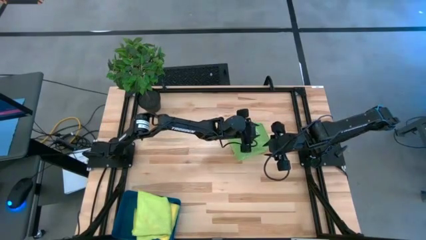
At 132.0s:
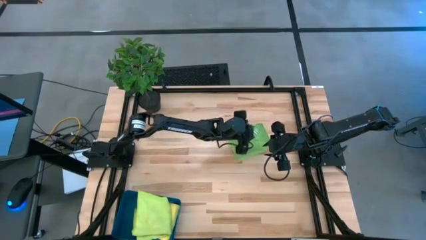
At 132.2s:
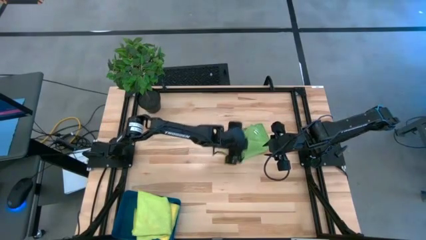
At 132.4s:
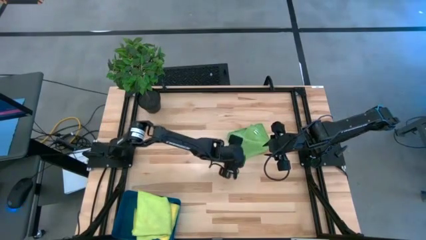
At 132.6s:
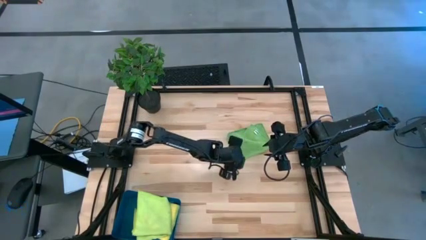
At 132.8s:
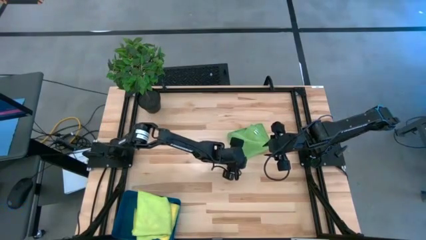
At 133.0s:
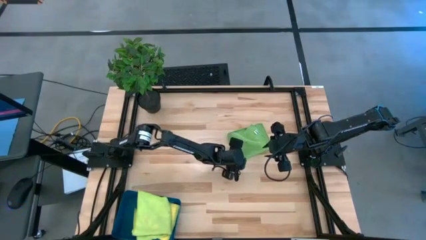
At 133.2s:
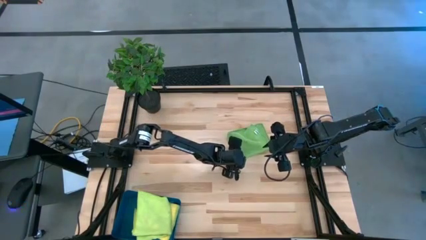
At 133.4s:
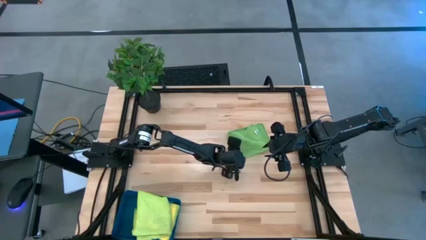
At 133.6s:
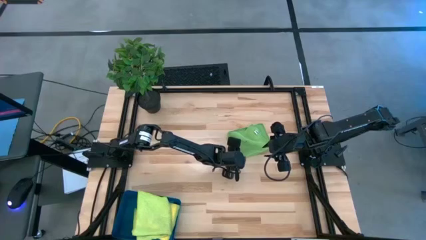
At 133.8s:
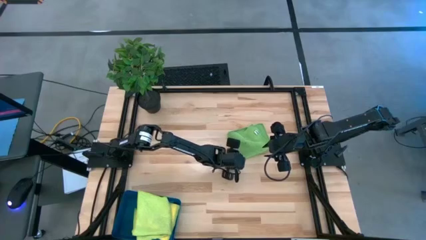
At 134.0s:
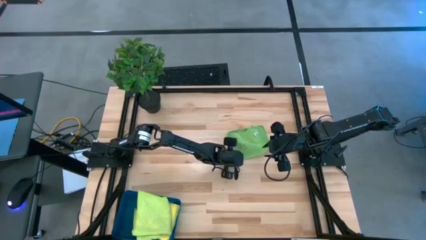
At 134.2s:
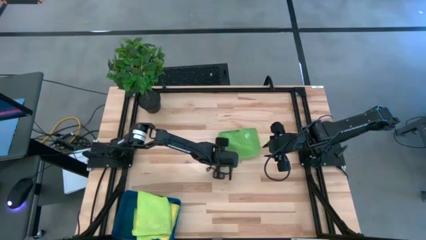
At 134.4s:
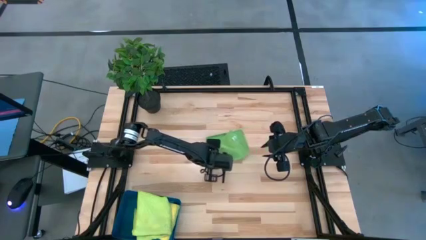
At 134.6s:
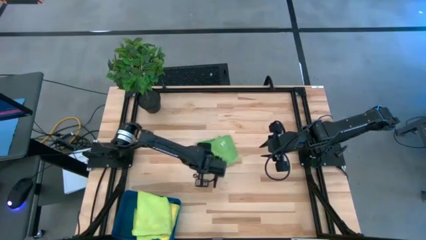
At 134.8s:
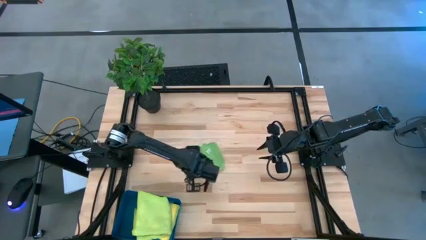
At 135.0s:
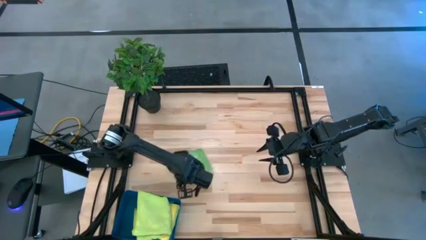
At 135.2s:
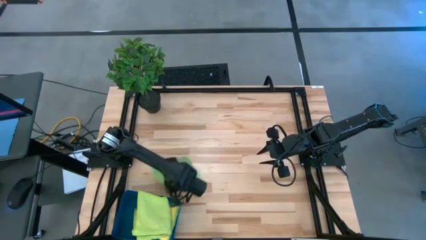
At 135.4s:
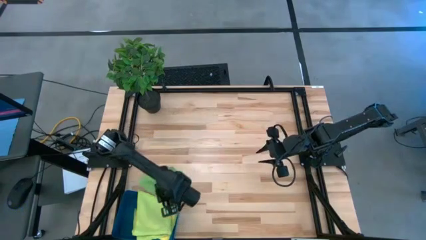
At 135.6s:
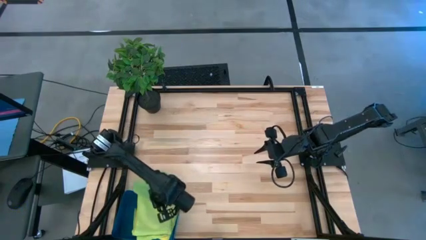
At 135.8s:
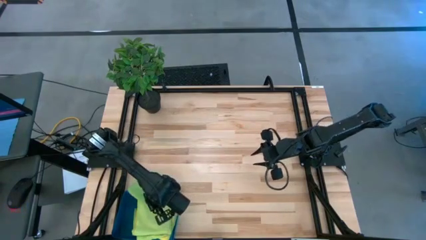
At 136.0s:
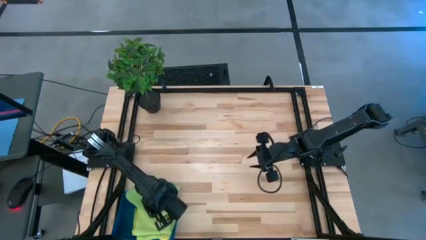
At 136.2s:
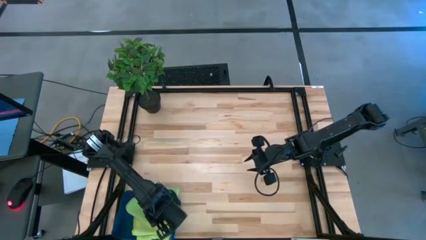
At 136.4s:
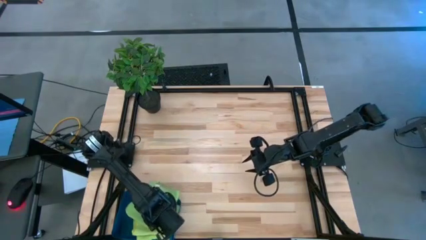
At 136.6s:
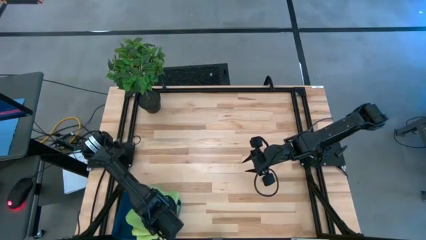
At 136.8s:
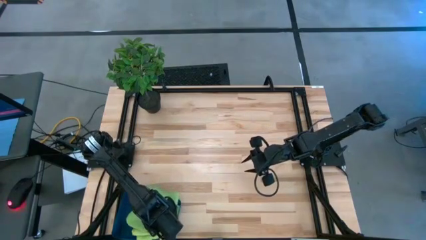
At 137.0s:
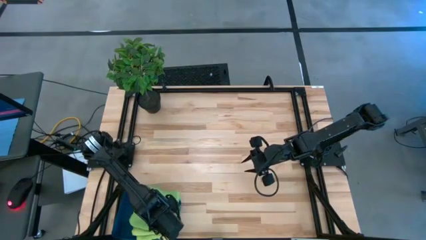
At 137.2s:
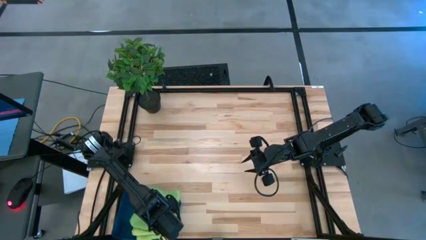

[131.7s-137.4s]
Task: Fold microfiber towels
Put the green microfiber towel into the bin

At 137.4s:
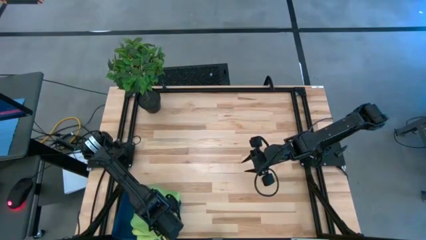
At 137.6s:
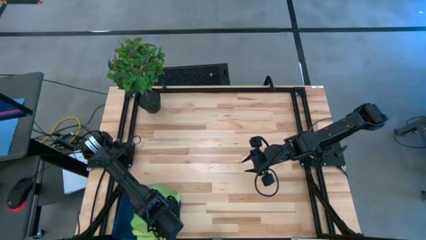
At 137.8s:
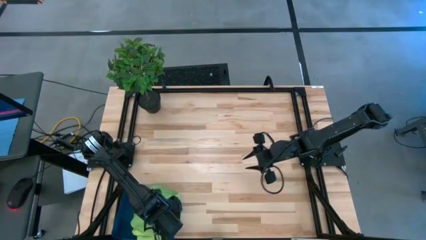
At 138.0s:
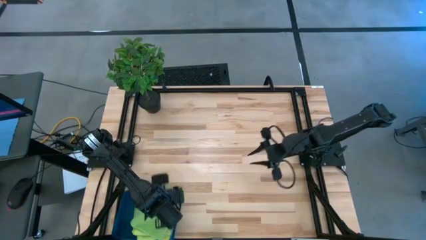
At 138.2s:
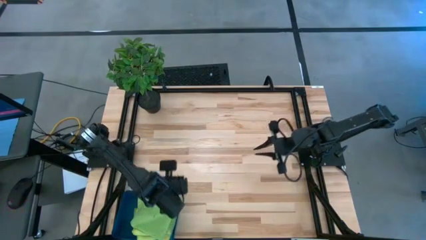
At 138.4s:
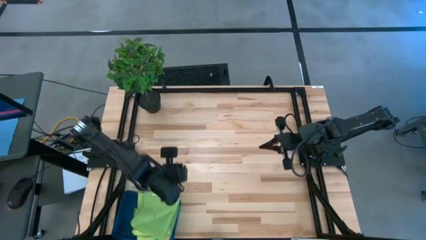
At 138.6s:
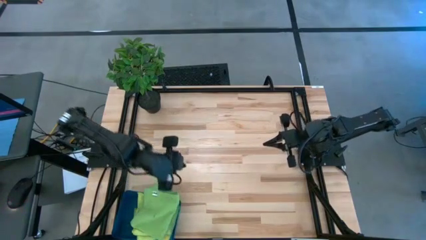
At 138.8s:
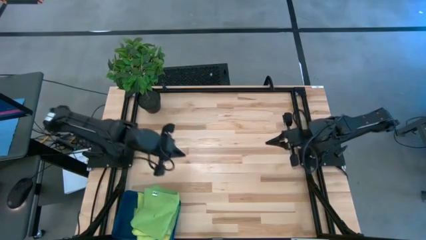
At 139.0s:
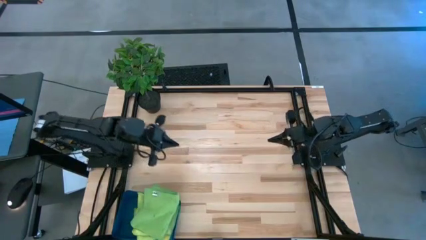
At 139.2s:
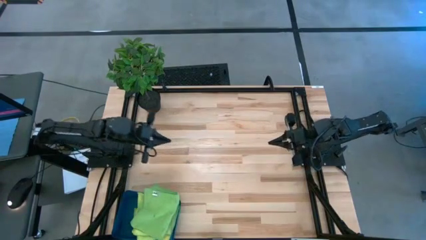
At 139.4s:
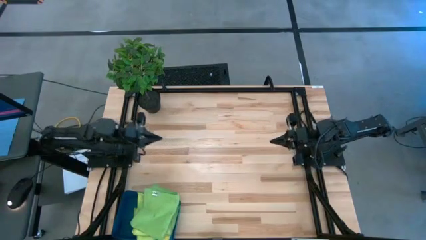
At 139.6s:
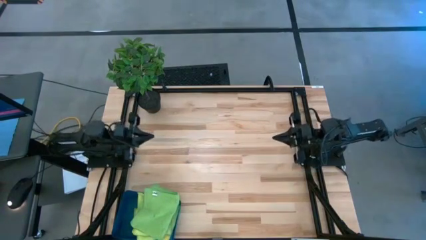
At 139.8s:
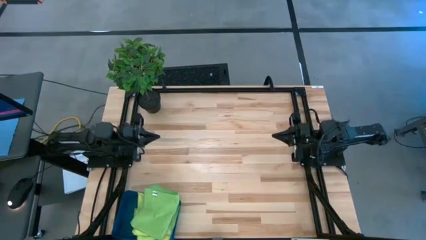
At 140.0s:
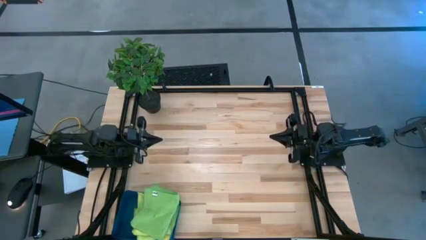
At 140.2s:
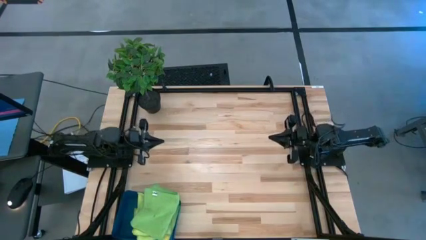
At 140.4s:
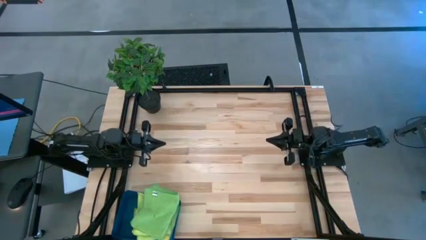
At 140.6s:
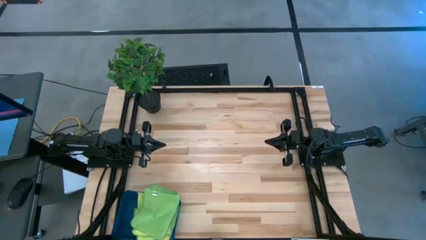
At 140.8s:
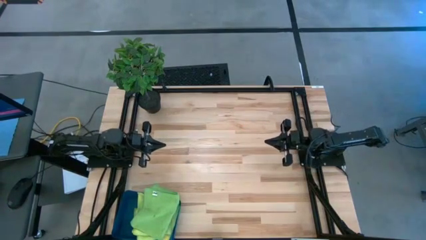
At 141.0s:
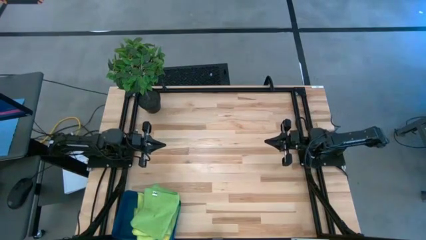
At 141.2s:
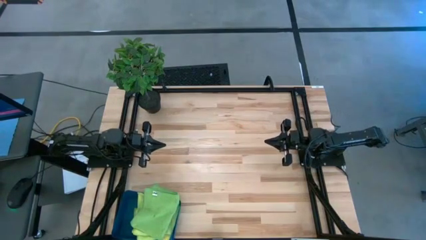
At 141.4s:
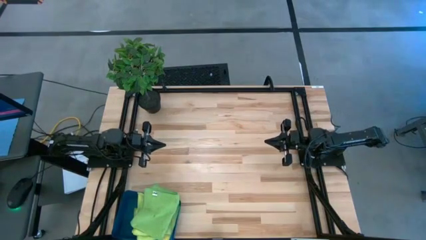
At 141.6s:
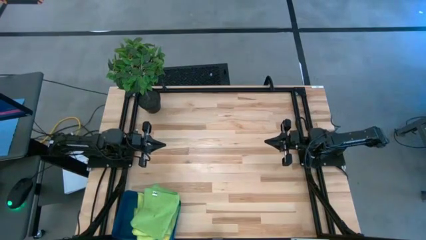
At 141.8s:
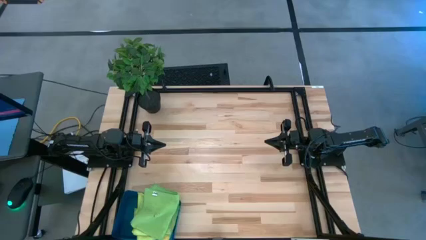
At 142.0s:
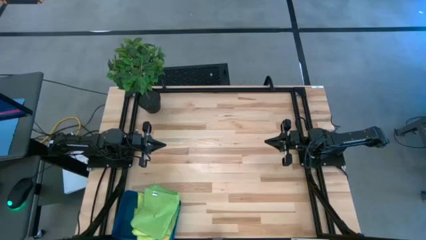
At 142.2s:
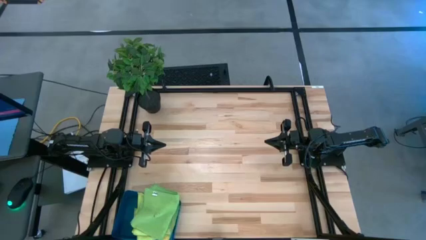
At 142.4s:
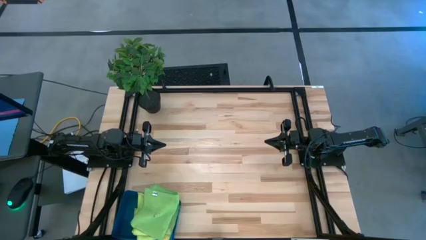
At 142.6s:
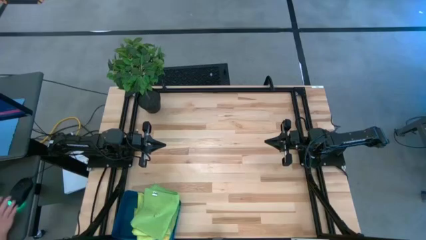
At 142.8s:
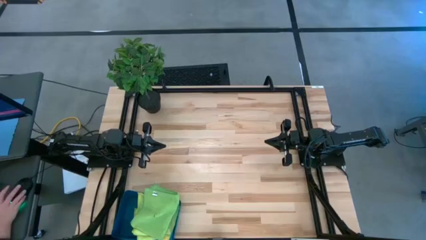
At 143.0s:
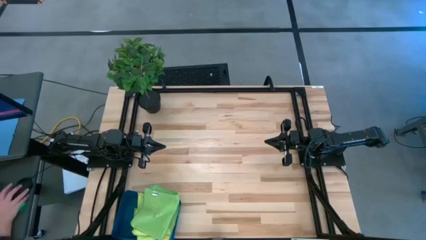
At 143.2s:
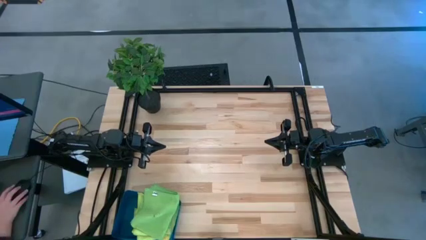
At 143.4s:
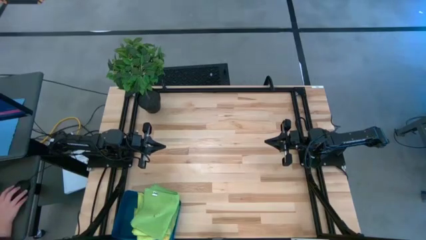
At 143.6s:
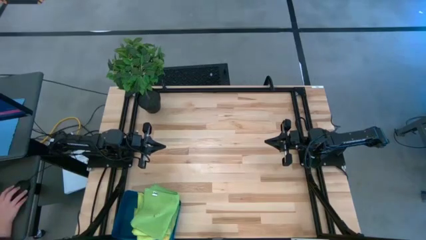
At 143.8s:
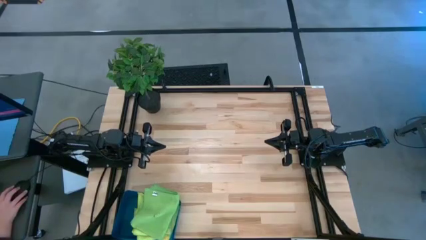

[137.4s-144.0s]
Return to Home Position

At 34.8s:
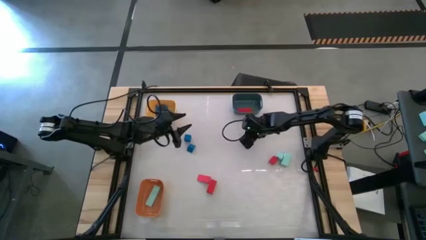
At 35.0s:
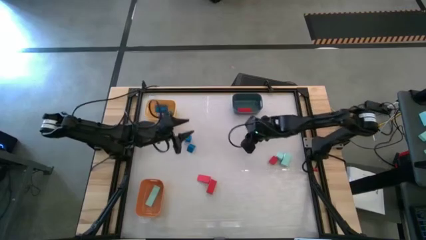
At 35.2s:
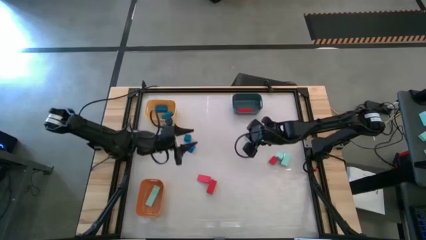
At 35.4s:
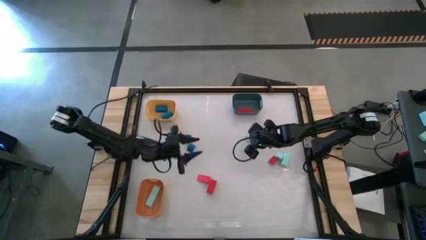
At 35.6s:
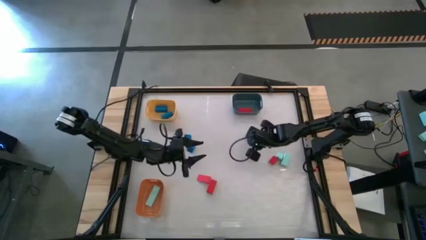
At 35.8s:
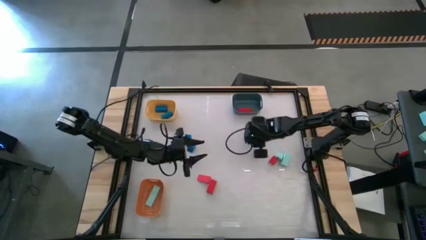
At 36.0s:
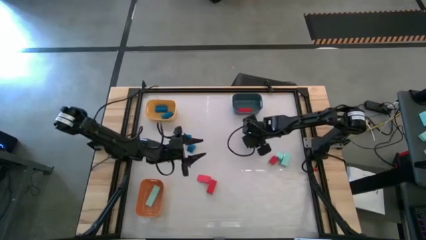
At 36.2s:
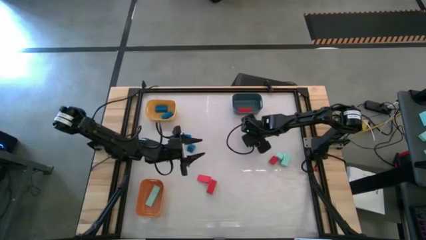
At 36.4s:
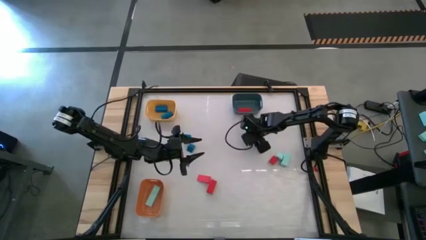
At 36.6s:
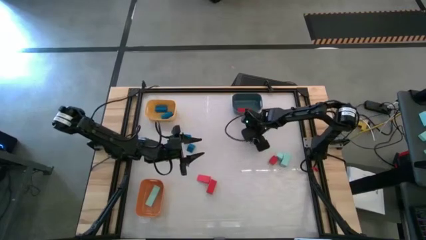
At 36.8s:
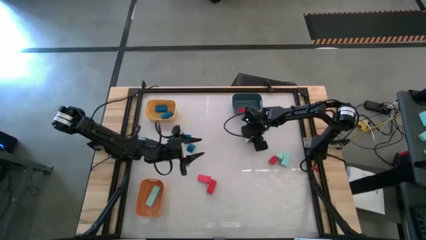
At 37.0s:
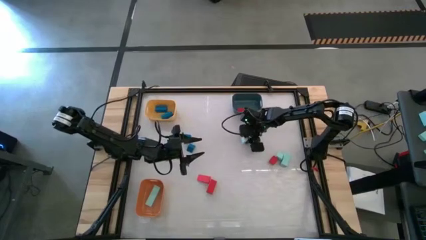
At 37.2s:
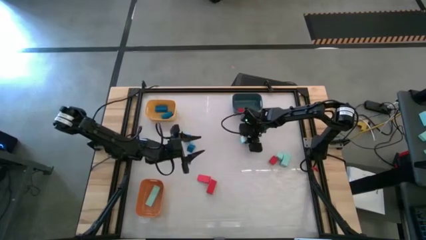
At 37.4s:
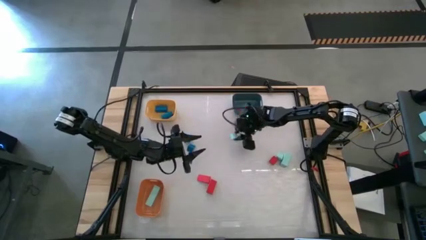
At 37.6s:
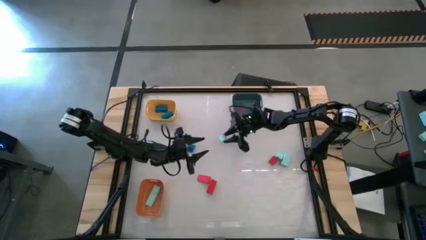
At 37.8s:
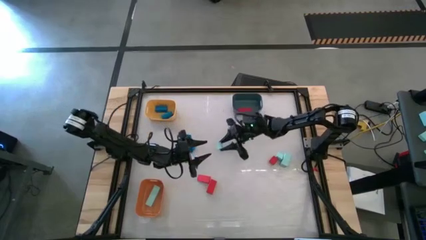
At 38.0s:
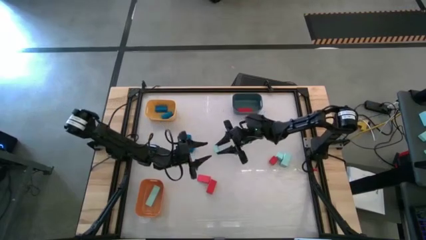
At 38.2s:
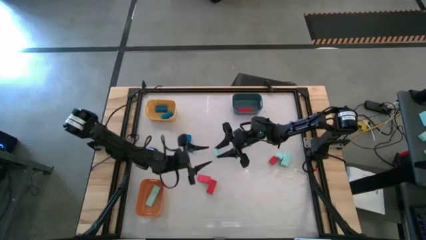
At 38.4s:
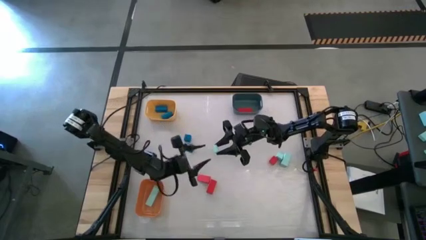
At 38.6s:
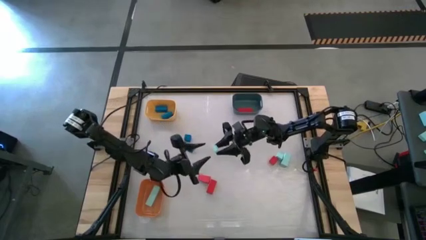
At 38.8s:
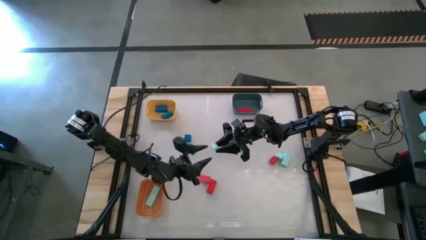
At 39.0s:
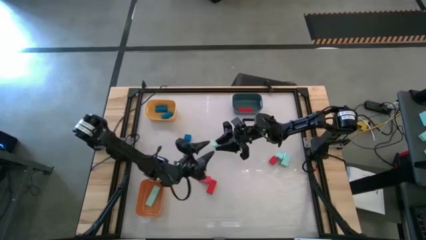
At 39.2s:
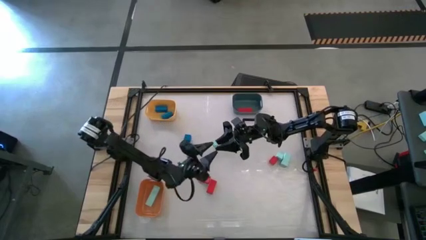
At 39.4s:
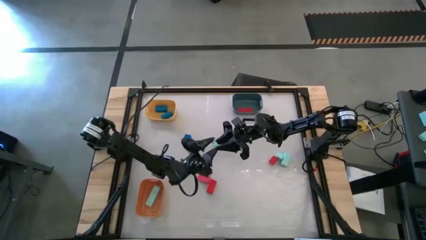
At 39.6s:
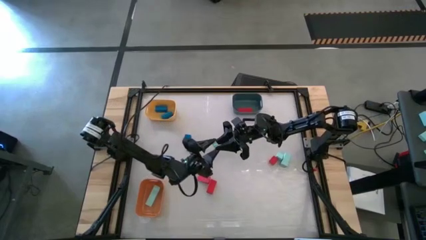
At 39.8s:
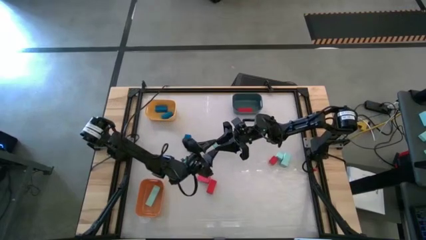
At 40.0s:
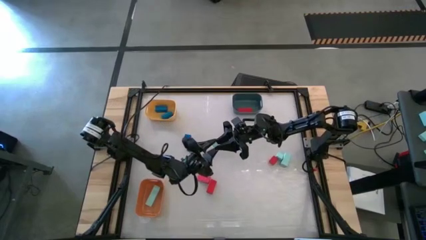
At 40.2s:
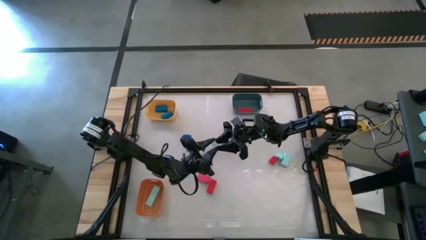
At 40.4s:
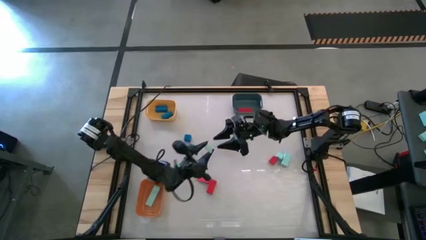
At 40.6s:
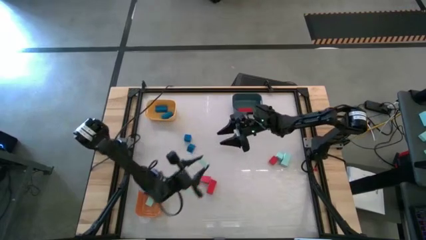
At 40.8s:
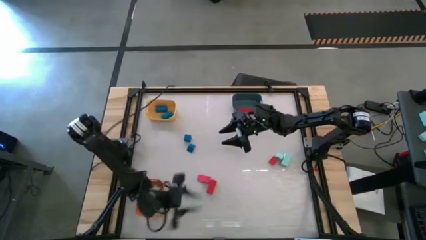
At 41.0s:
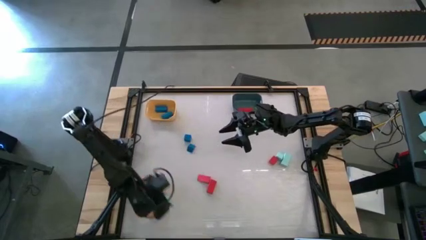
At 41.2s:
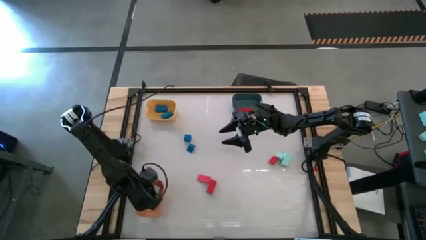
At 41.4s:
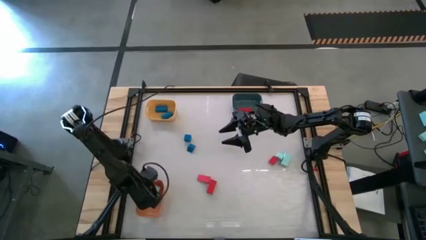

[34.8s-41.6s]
Task: Sort & place blocks by color
Put the top left light blue block into the orange bin
